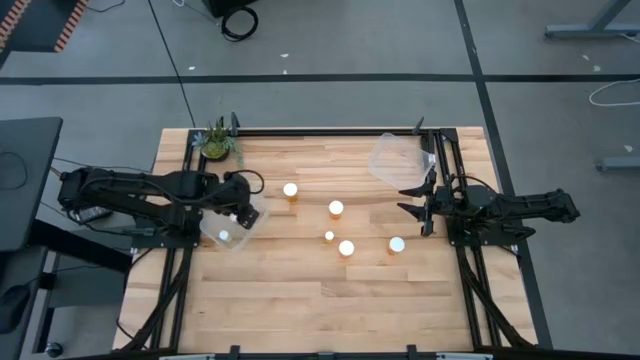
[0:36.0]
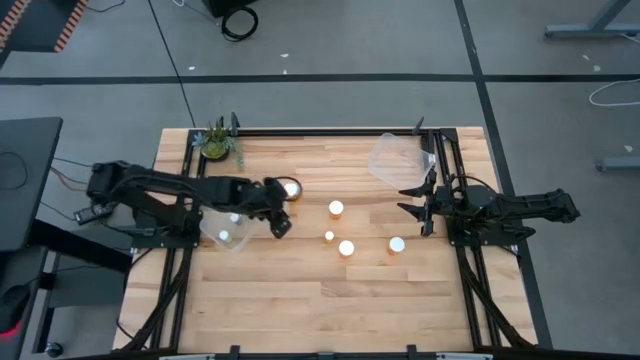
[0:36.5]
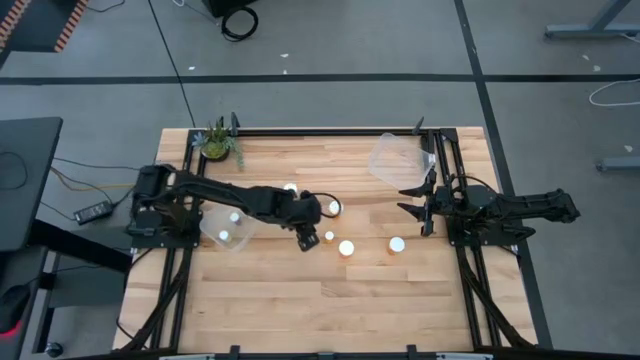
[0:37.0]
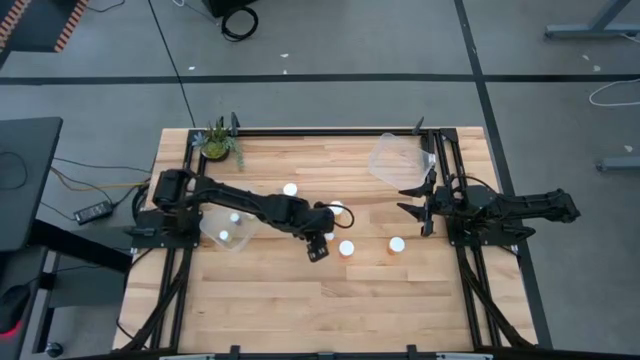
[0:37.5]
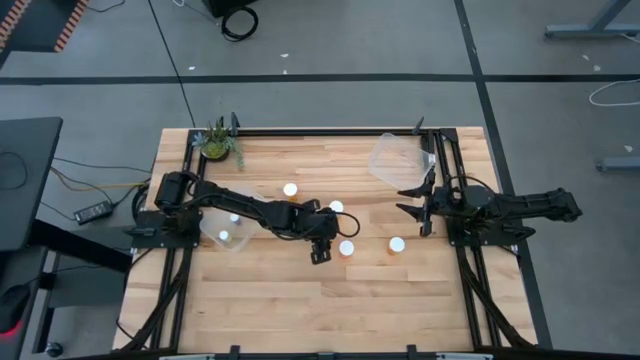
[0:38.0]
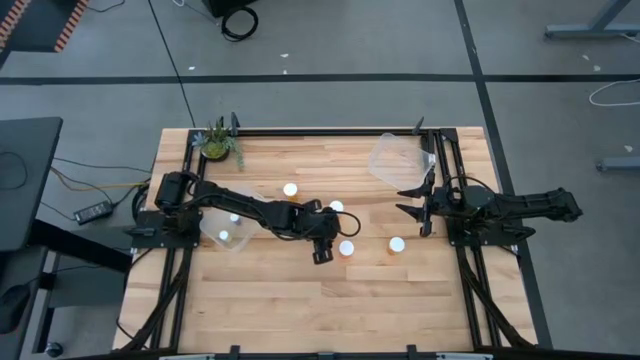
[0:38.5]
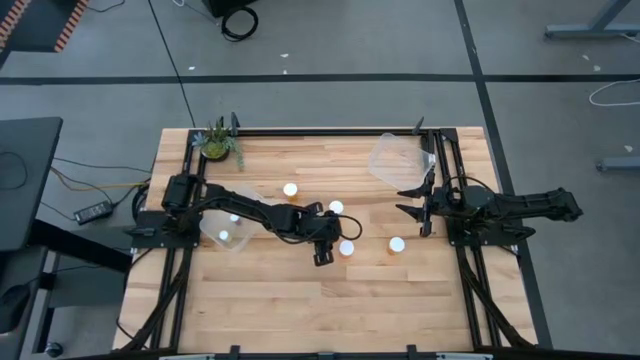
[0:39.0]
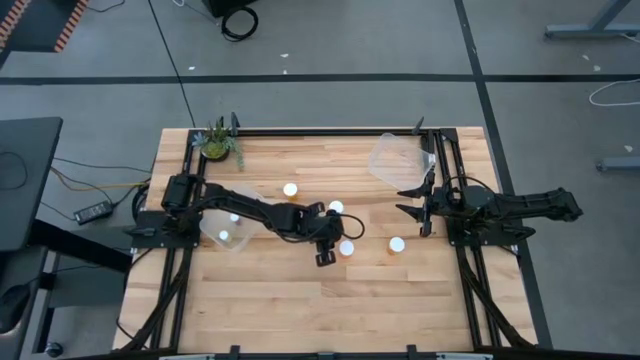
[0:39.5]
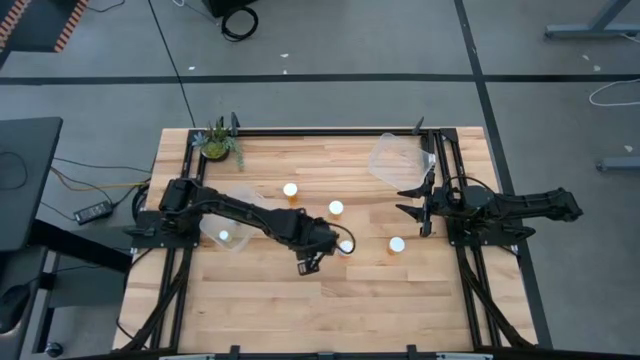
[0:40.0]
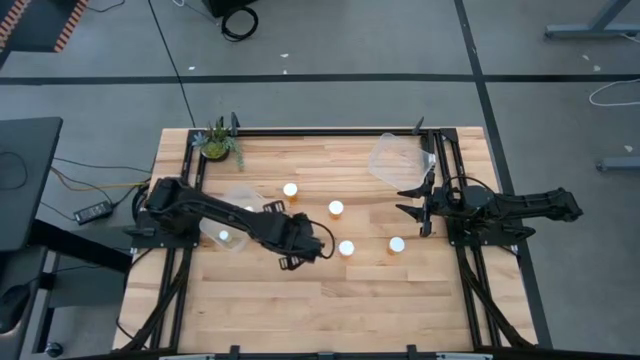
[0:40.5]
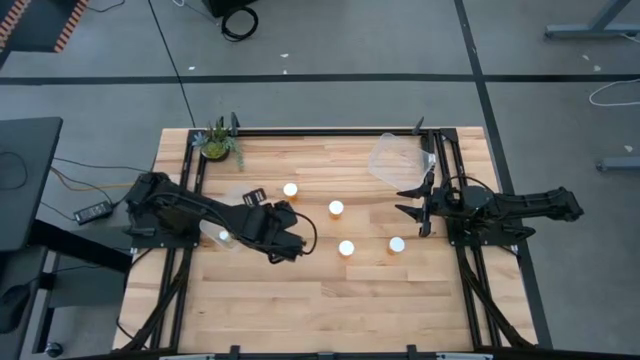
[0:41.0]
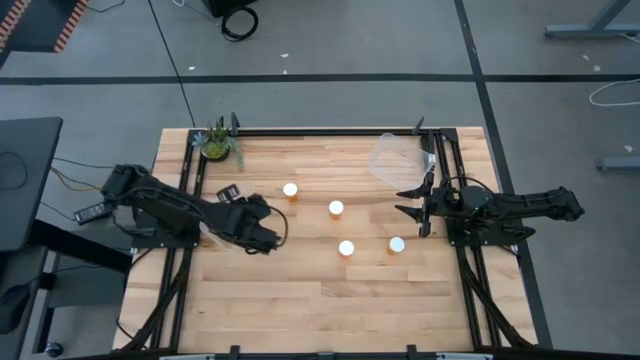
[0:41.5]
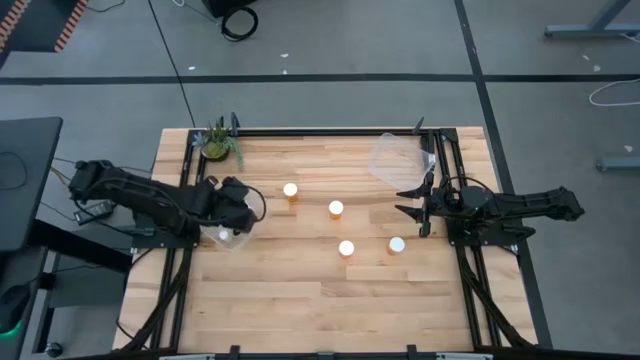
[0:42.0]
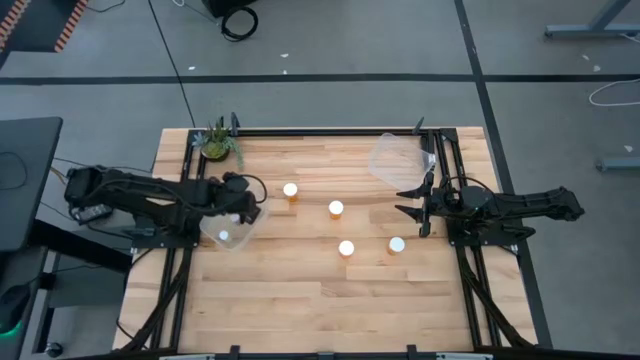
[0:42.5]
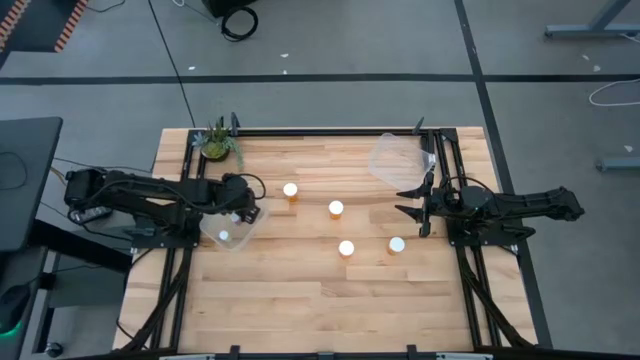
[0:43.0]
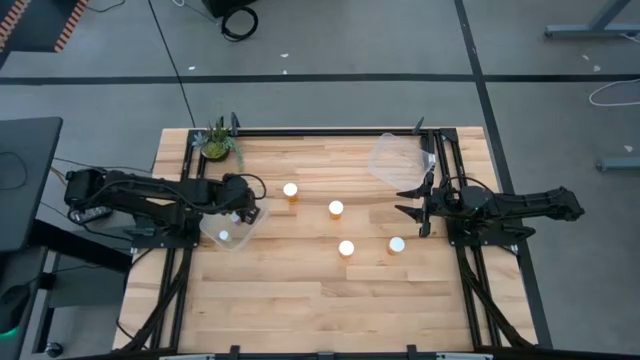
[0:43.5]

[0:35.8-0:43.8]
Task: Pick and place medicine bottles into bin by pill shape (circle, oval)
Put the small orange pill bottle into the left transparent bin

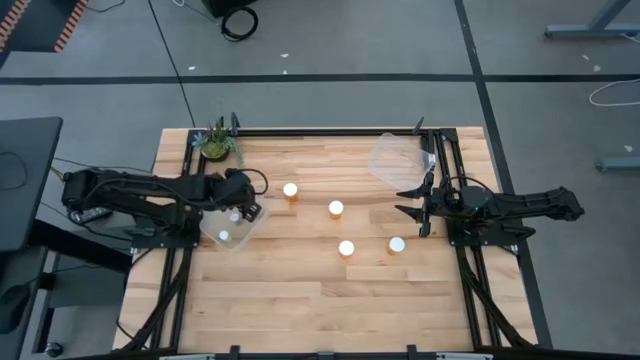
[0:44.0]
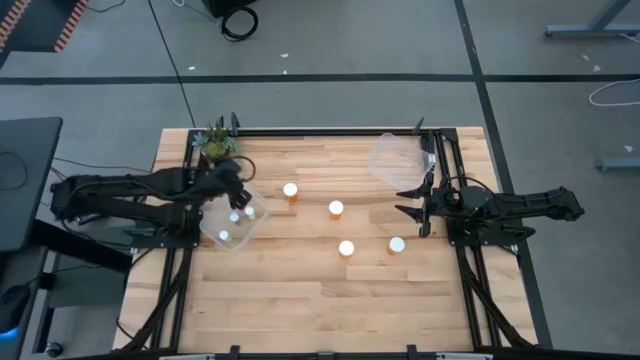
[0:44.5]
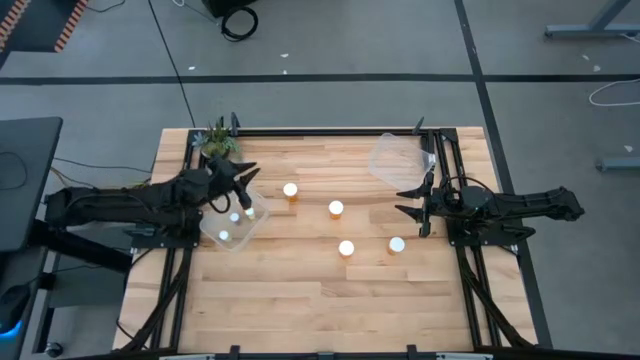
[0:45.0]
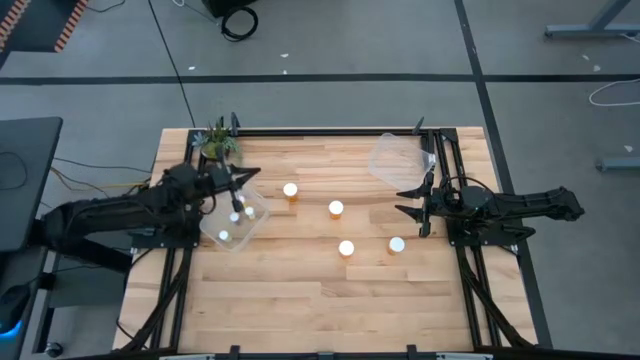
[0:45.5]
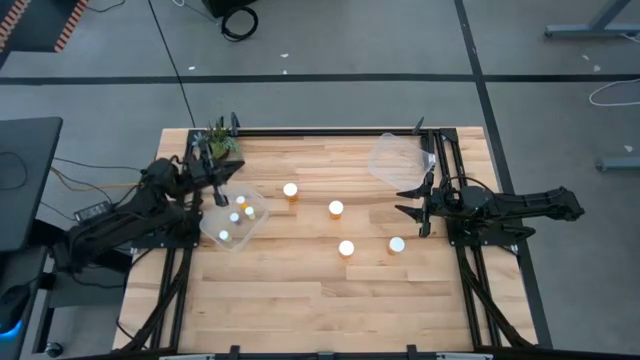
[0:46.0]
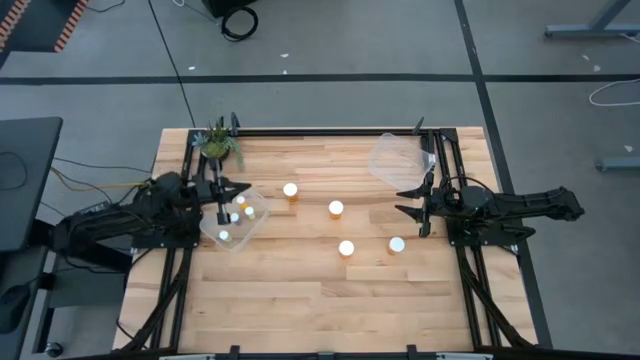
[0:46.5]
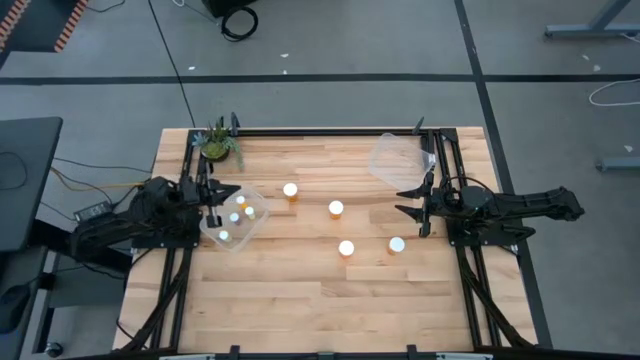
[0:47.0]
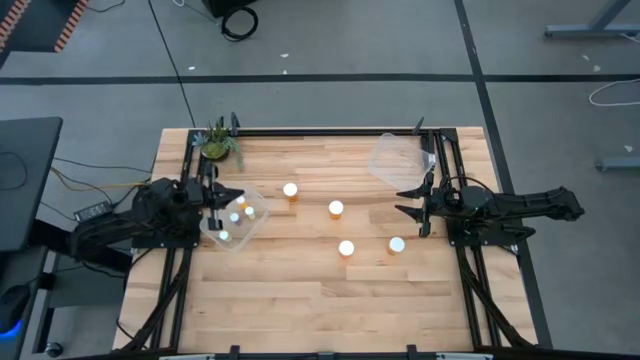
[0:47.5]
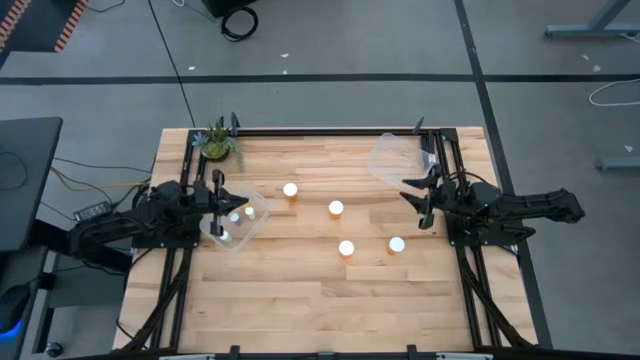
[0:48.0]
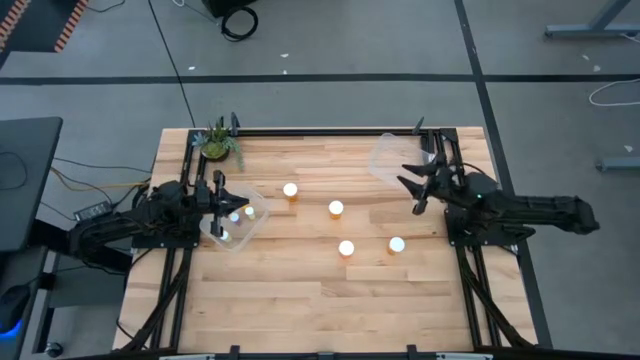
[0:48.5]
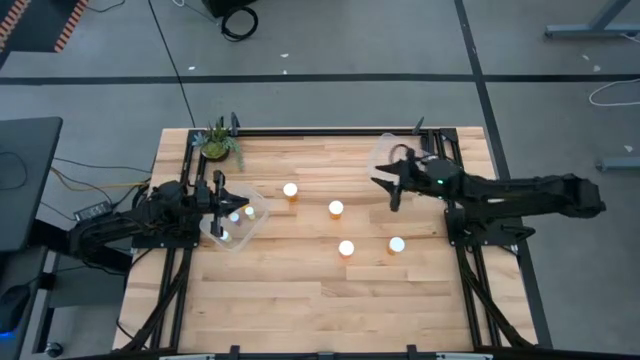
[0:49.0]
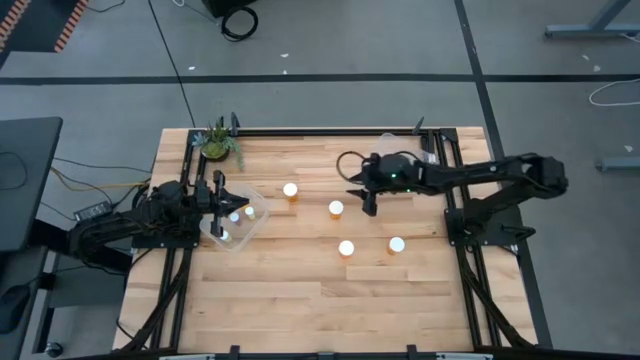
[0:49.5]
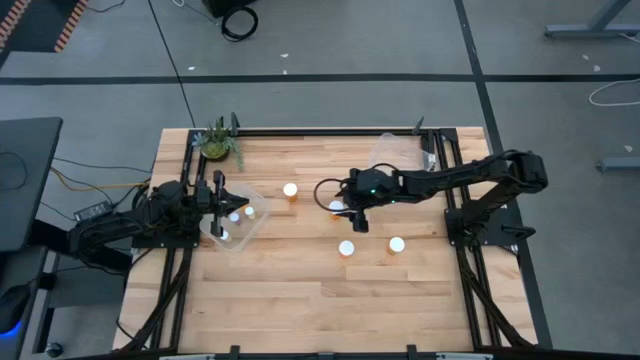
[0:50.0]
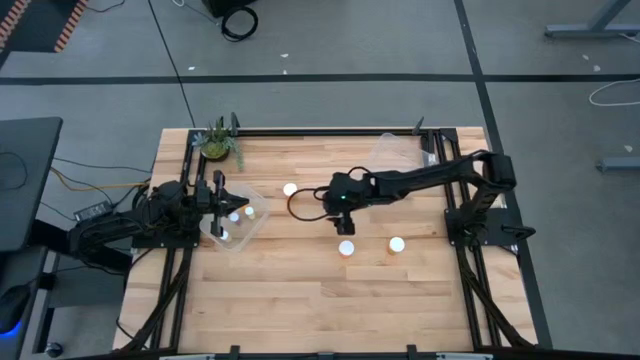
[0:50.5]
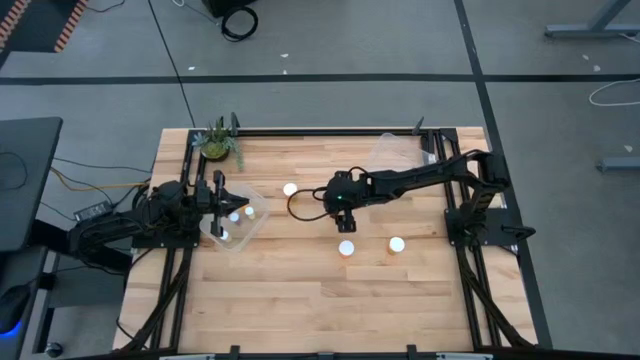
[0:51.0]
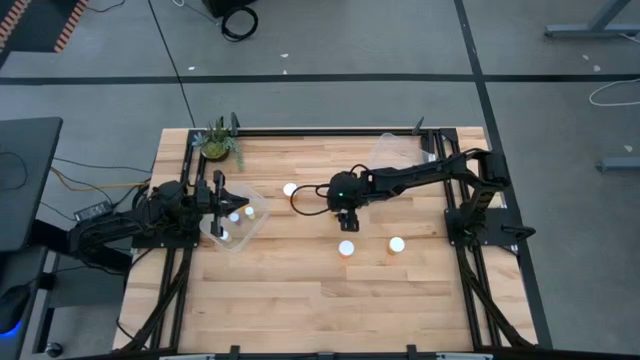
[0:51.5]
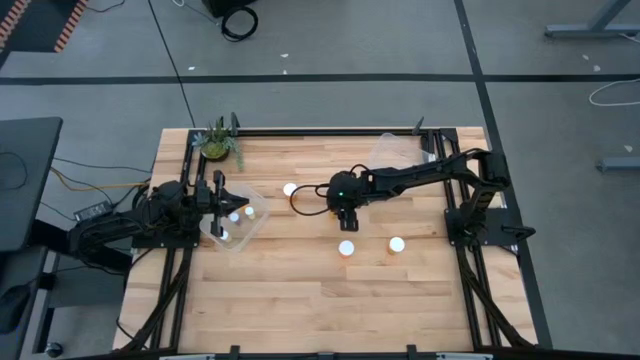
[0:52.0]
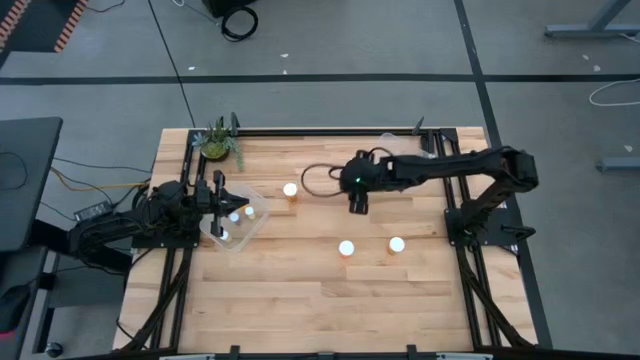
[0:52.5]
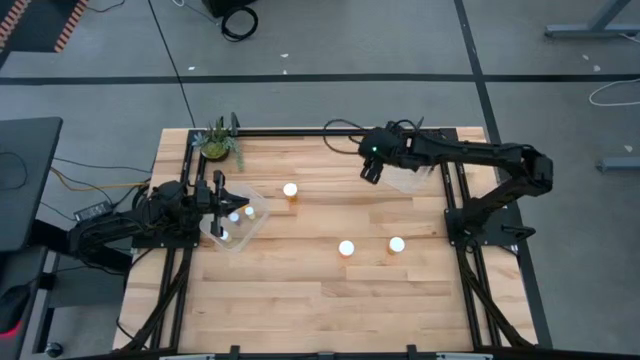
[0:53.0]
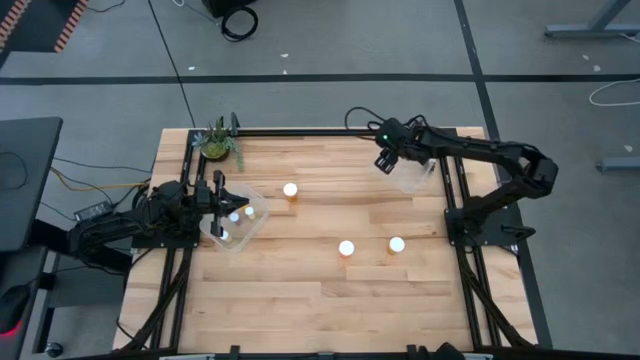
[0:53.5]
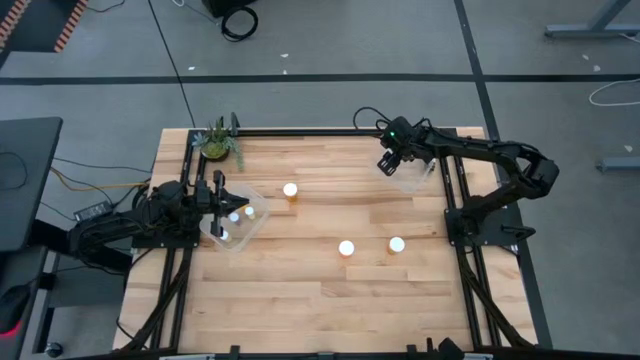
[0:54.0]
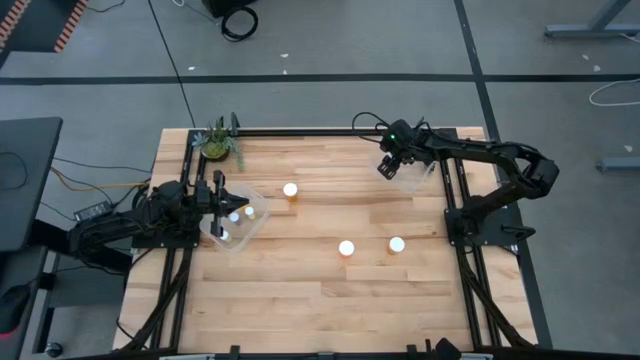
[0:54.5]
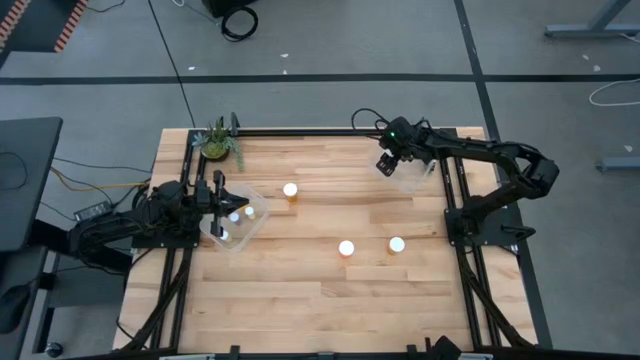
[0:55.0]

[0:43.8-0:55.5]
Put the large orange pill bottle into the right transparent bin

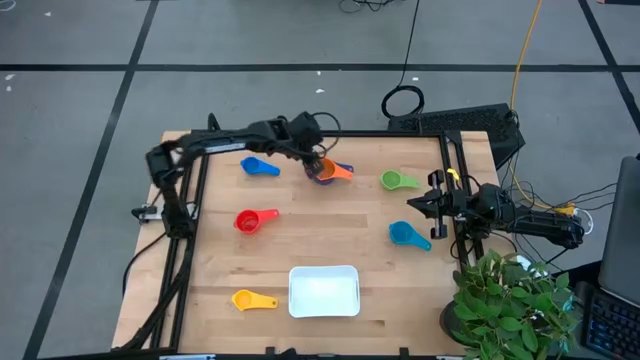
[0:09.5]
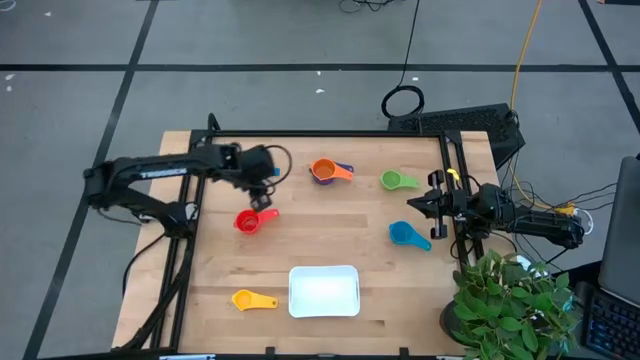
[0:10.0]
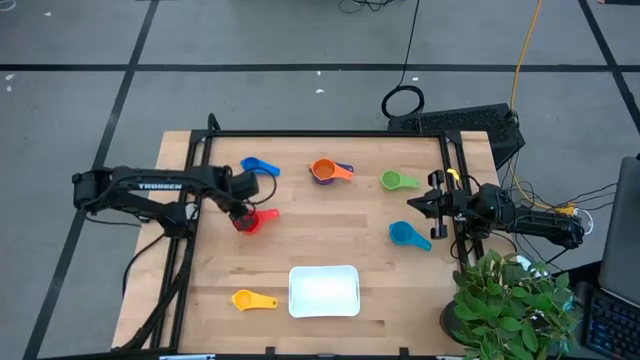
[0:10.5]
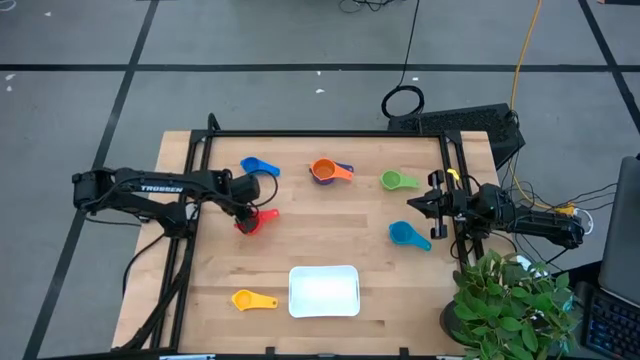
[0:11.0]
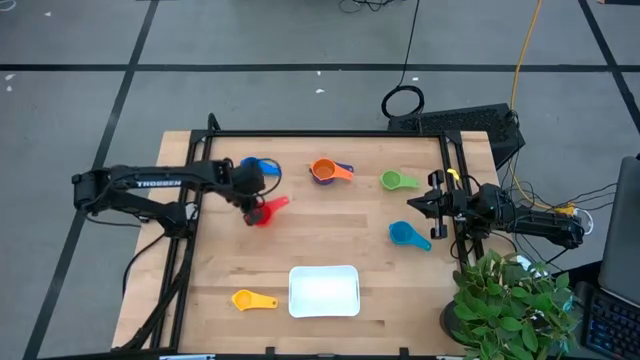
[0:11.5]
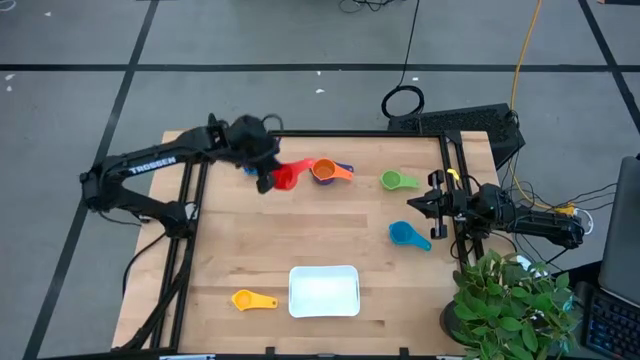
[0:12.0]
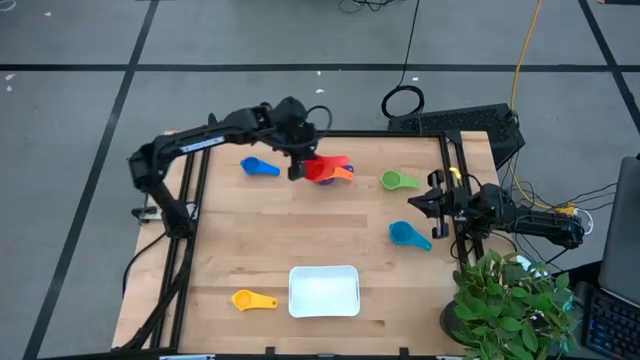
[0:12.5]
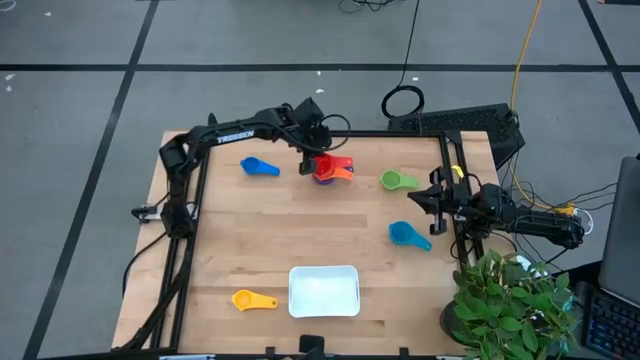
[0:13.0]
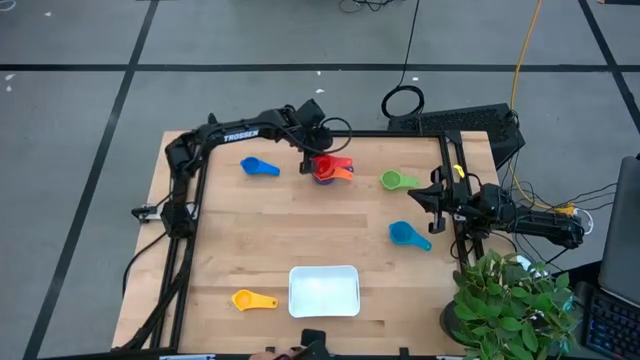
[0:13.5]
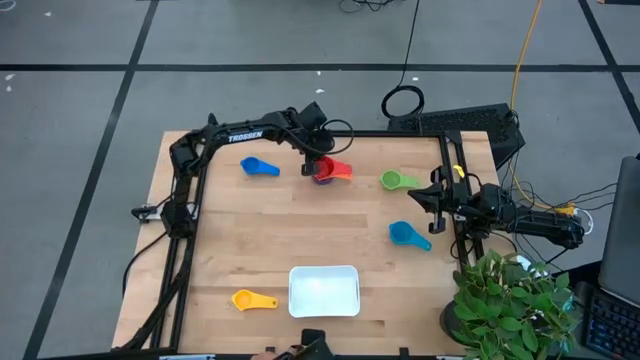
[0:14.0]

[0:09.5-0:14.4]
Task: Nest measuring cups in basket
Stack the red measuring cup on the orange measuring cup
